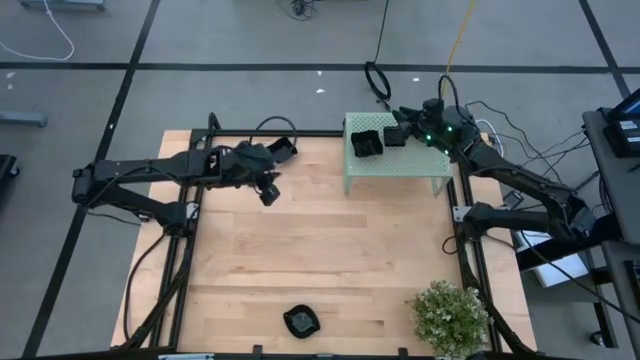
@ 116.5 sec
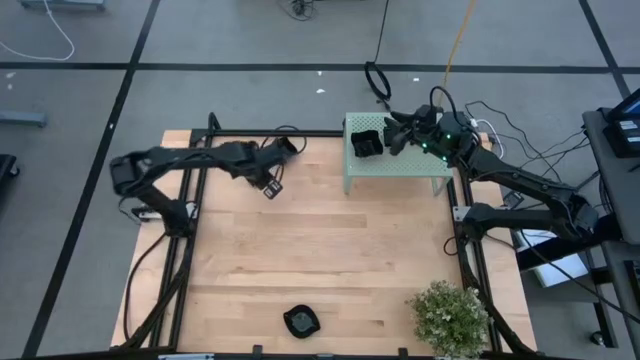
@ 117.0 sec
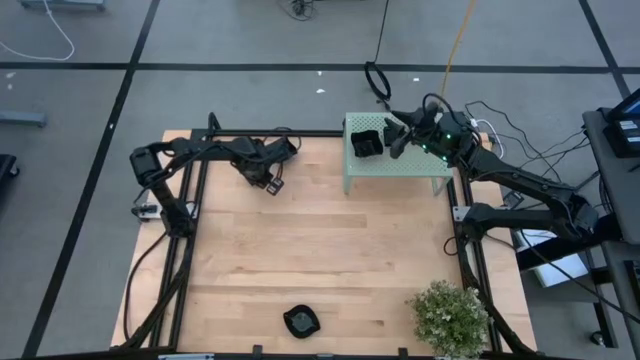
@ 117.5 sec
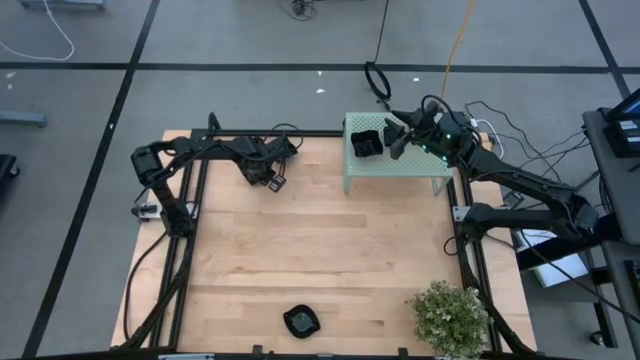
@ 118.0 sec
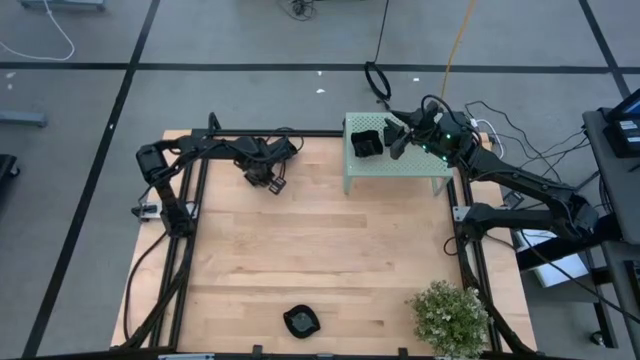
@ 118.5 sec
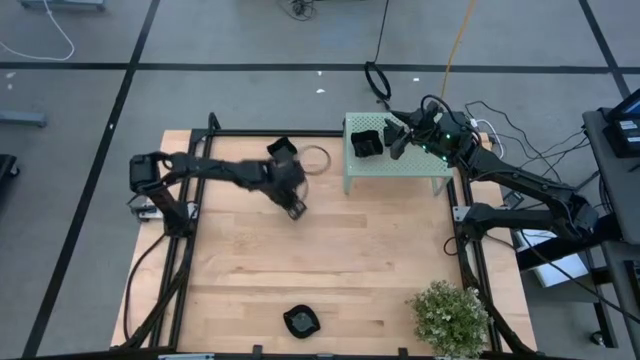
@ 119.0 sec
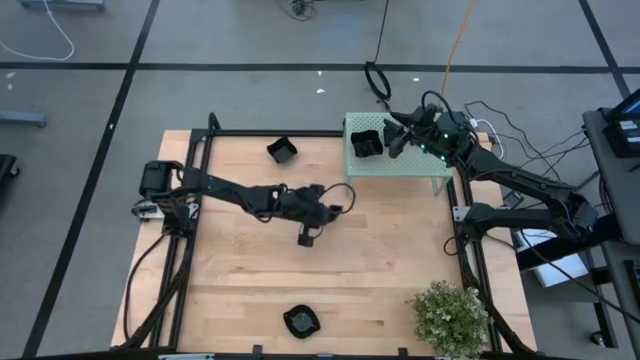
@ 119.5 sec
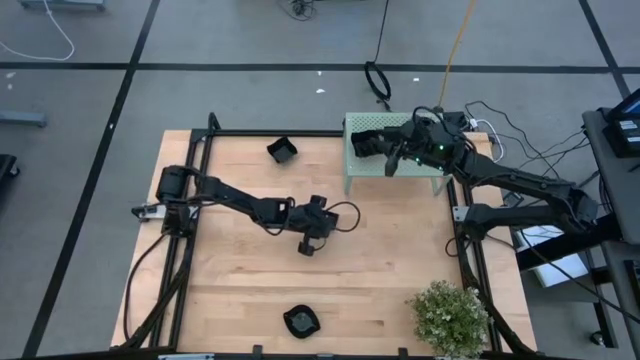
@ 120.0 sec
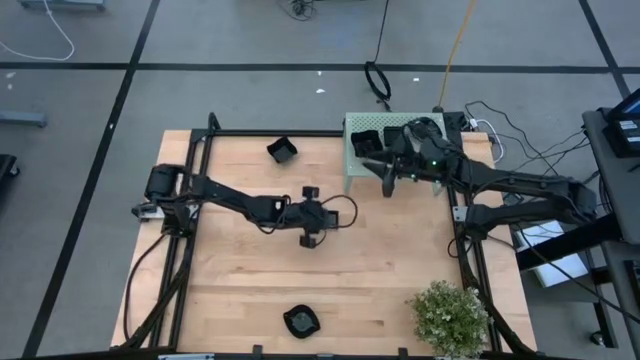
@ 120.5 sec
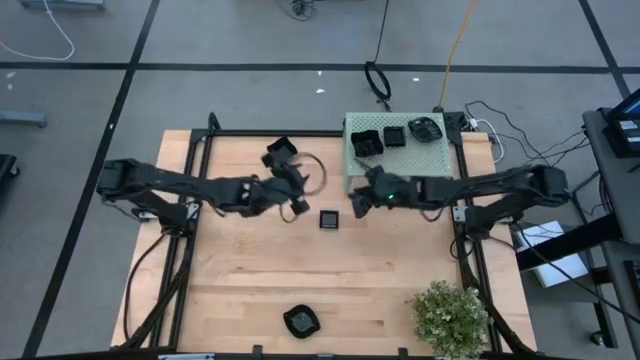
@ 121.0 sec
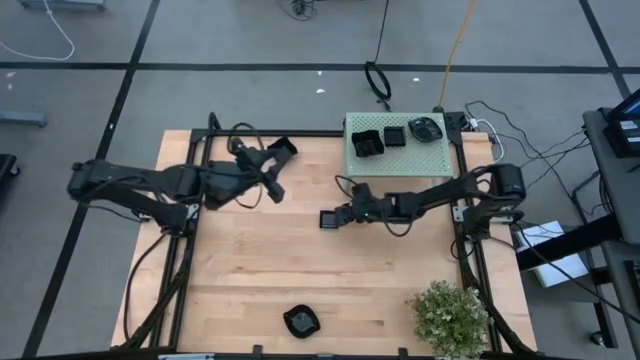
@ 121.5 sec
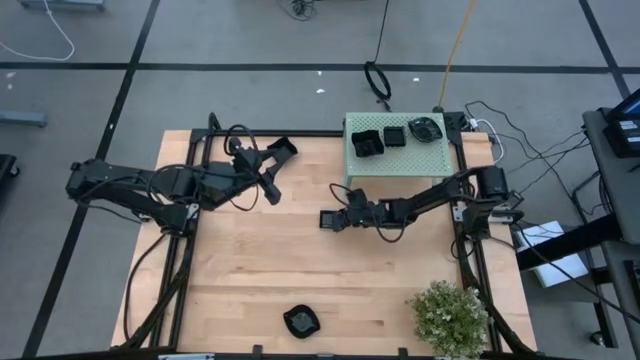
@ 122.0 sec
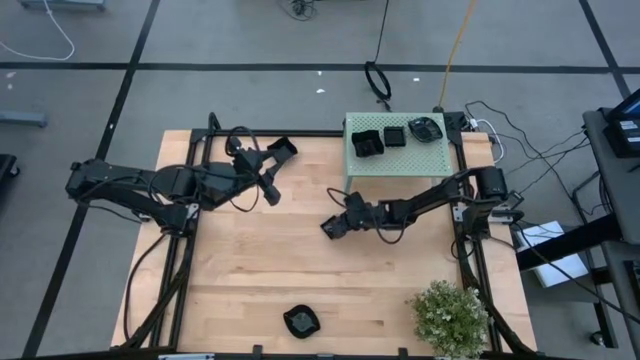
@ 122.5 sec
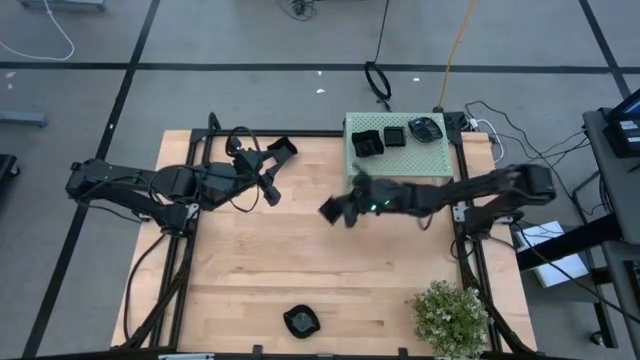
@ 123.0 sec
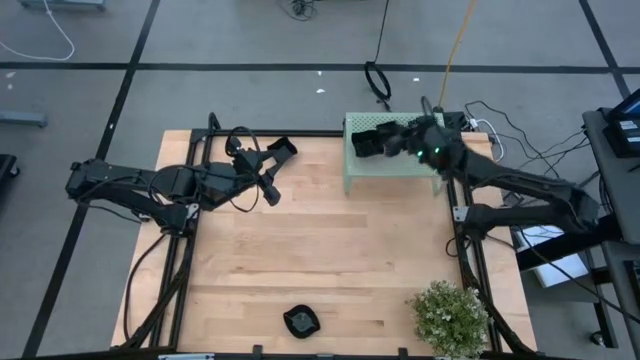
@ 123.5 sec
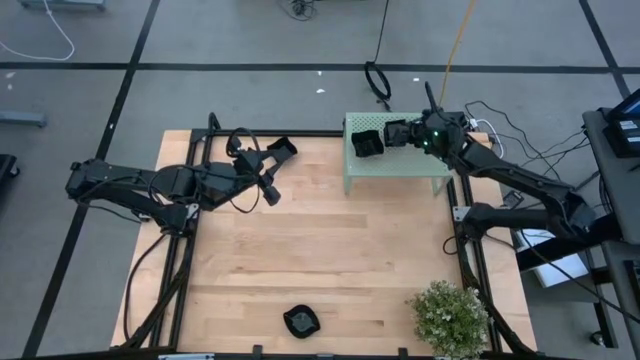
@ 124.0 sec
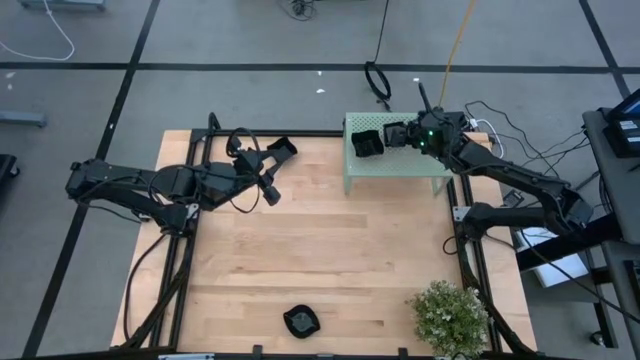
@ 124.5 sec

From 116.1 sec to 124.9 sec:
Task: Pick & Place Mini shaped plates
Stack the black square plate on top of the square plate on the shelf

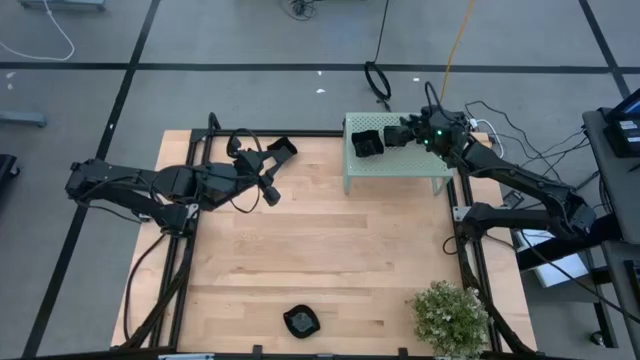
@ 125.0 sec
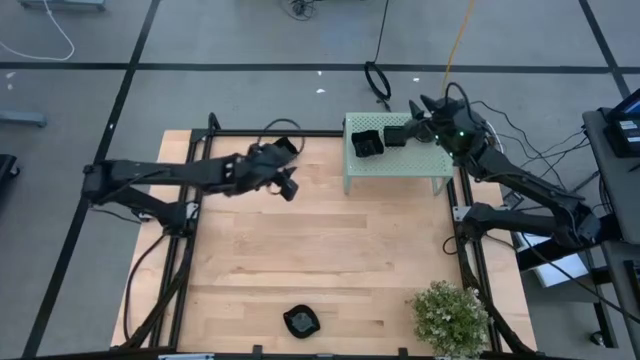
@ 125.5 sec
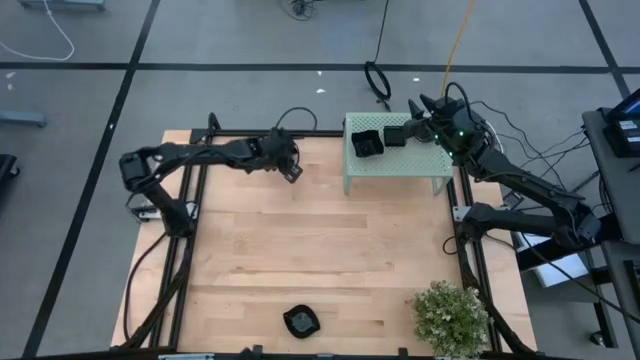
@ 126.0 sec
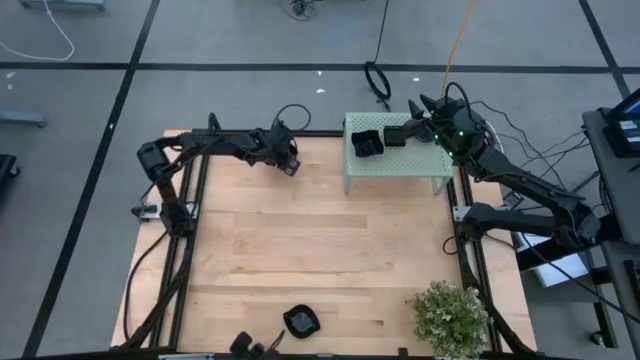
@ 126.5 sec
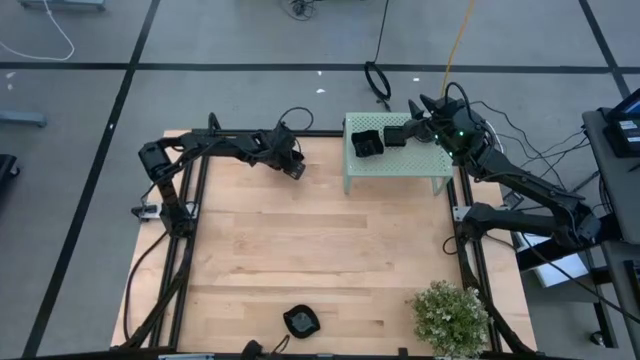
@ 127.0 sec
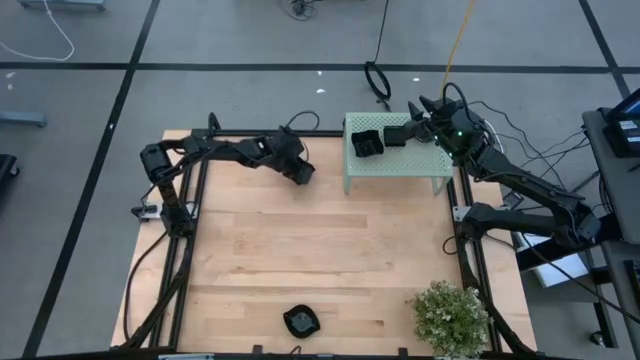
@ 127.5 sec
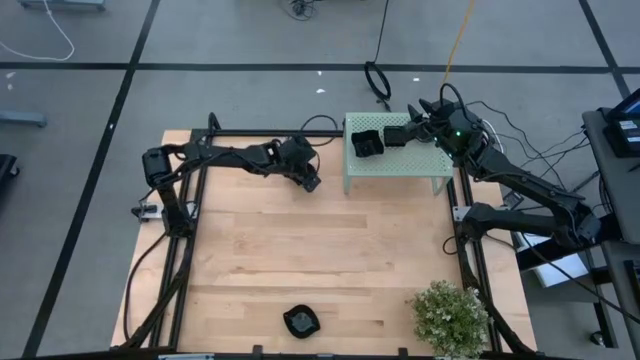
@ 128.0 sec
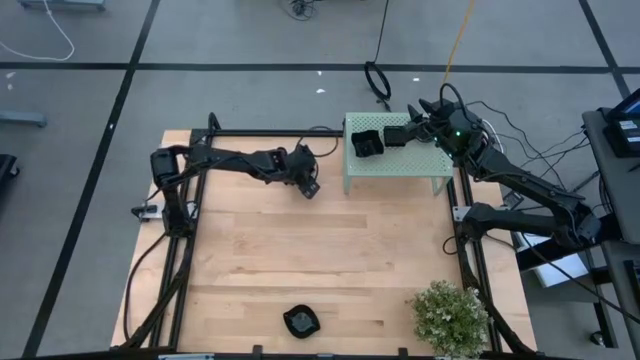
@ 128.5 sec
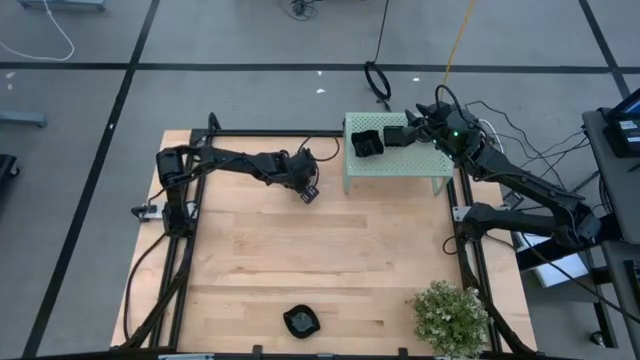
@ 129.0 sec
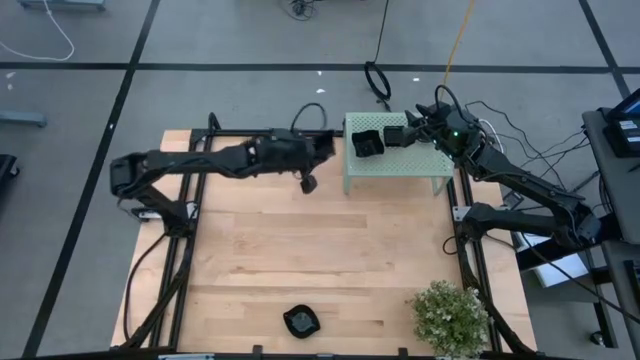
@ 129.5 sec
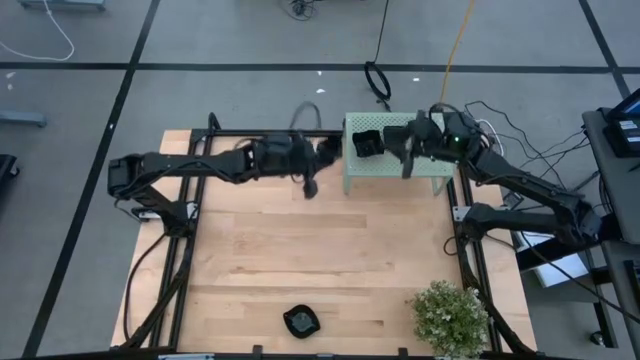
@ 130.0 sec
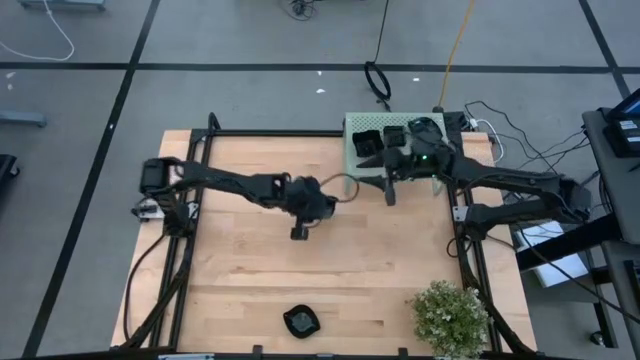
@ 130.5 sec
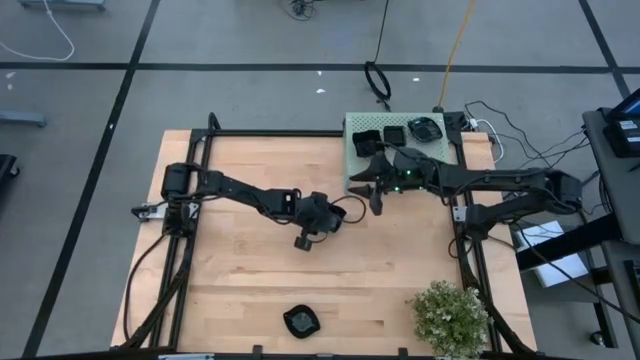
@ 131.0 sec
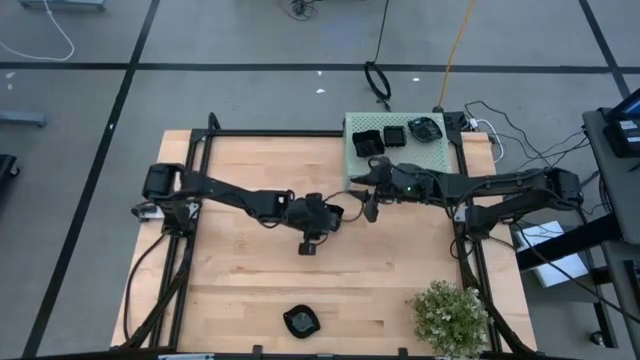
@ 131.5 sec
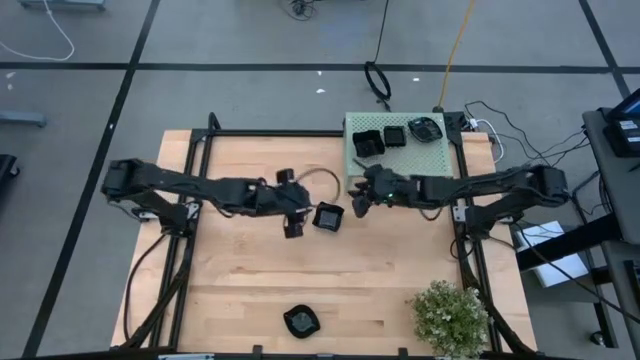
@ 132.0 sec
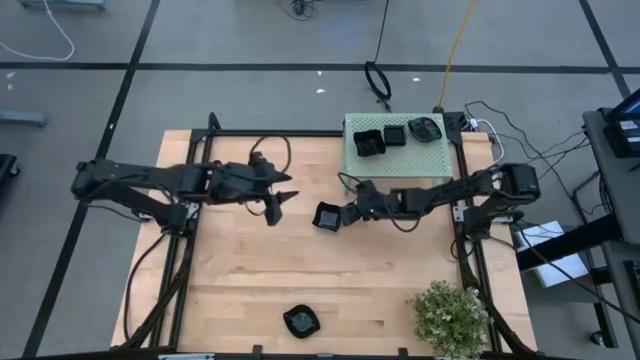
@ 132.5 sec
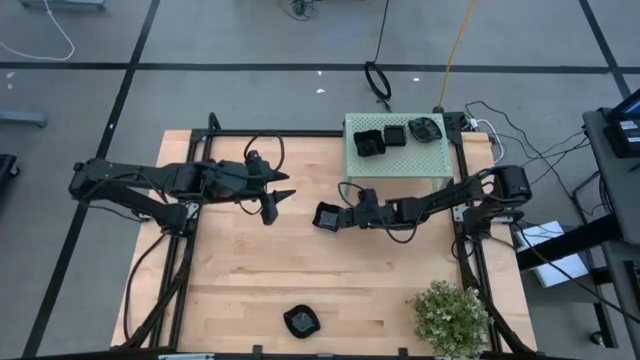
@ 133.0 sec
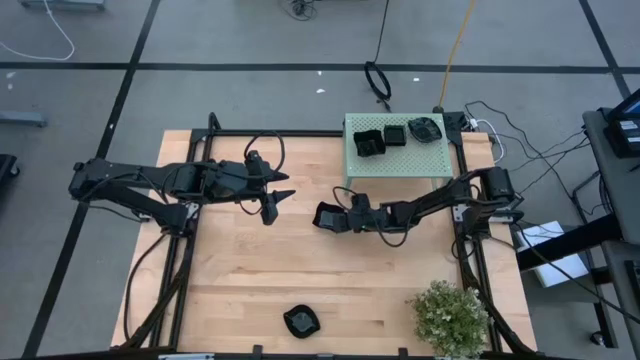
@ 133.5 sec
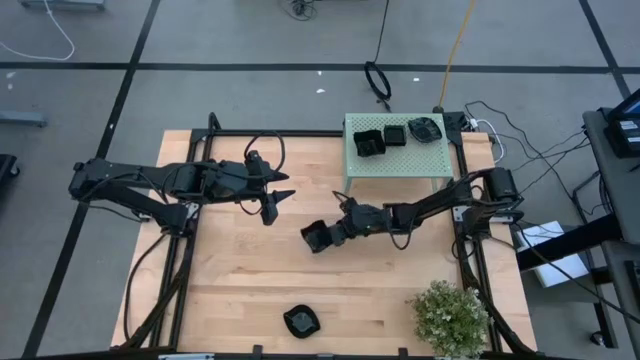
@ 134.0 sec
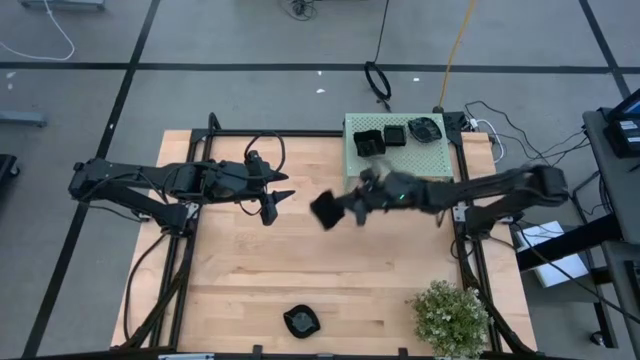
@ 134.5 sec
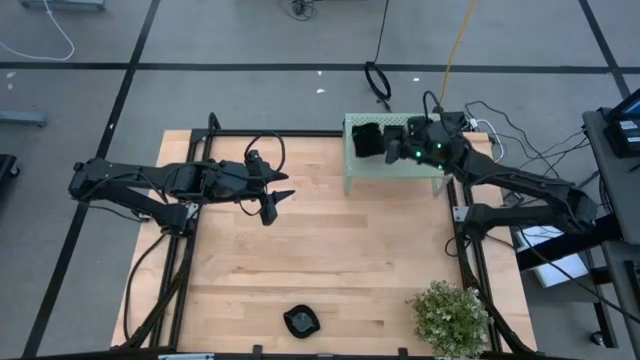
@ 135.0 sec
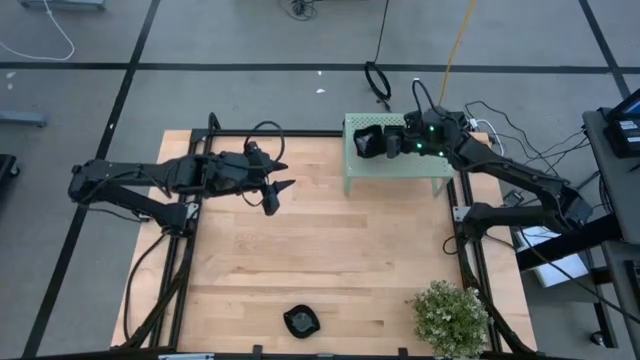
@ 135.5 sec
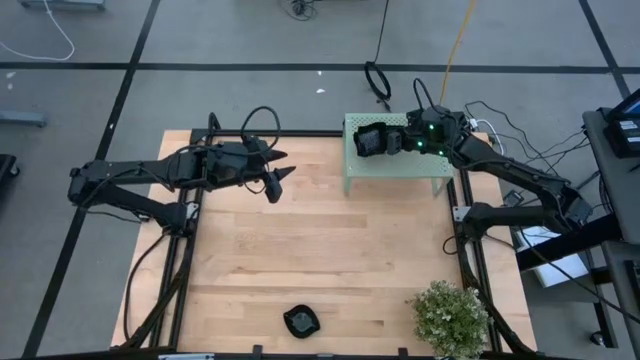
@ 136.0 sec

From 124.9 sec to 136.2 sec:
Stack the black distorted square plate on top of the distorted square plate on the shelf

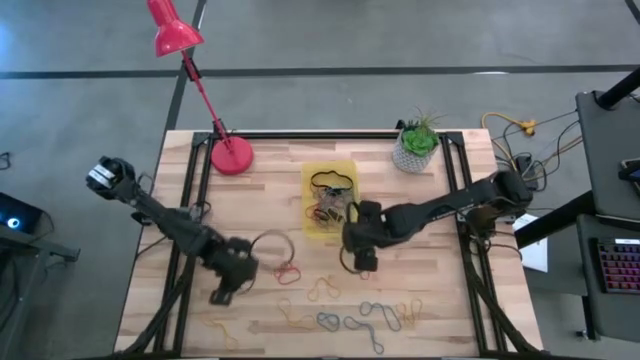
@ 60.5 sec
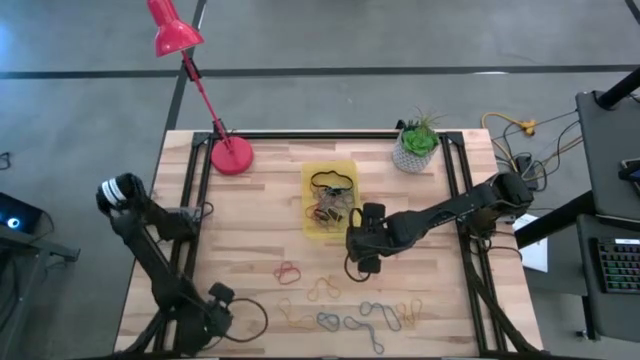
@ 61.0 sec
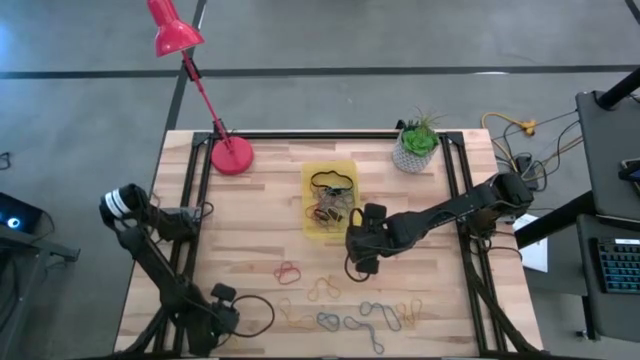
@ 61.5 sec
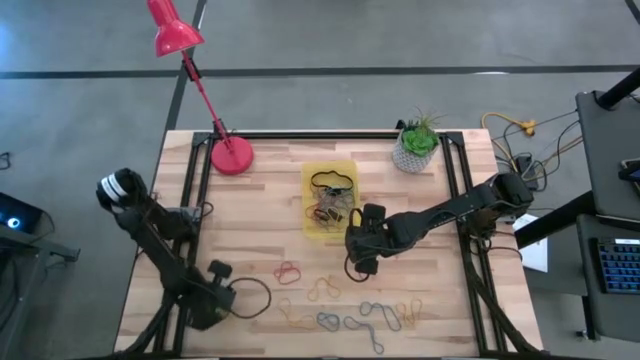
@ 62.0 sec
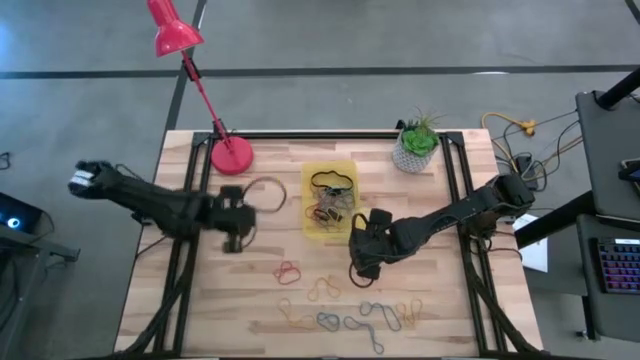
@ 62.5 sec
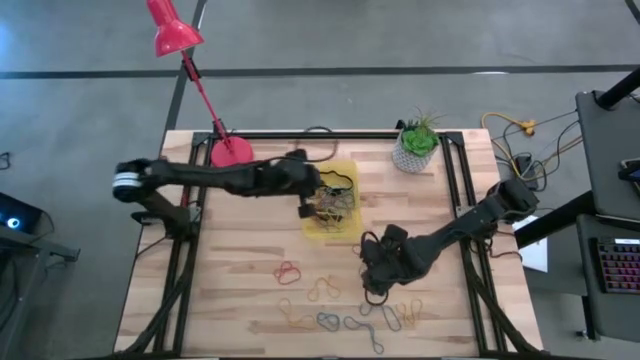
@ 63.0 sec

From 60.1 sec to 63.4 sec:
Task: Pick and place rubber bands into bin
Put the yellow rubber band into the yellow bin
